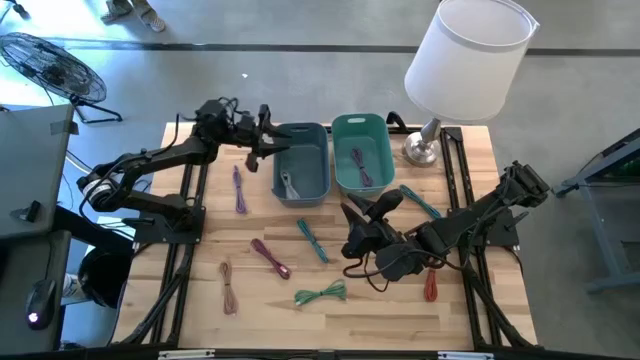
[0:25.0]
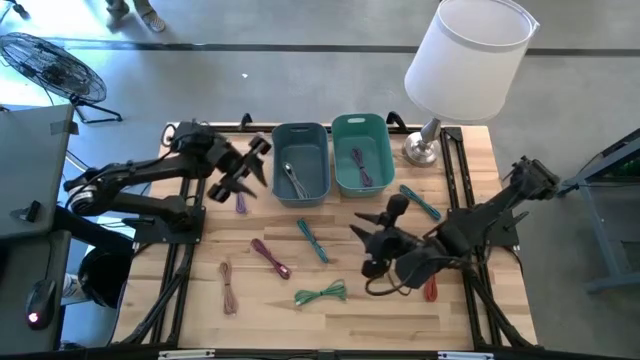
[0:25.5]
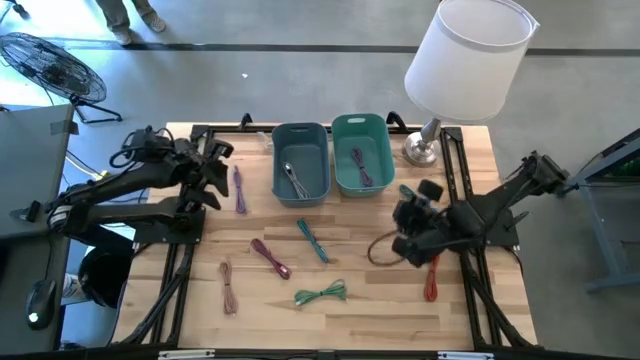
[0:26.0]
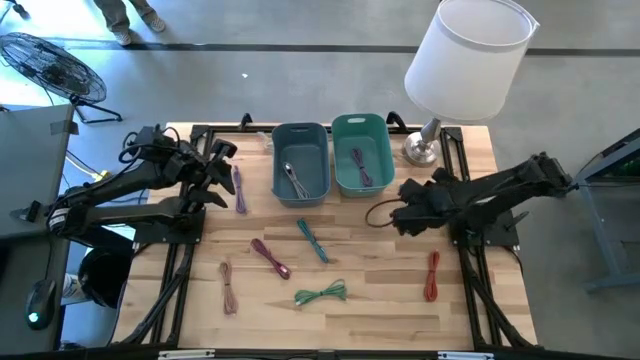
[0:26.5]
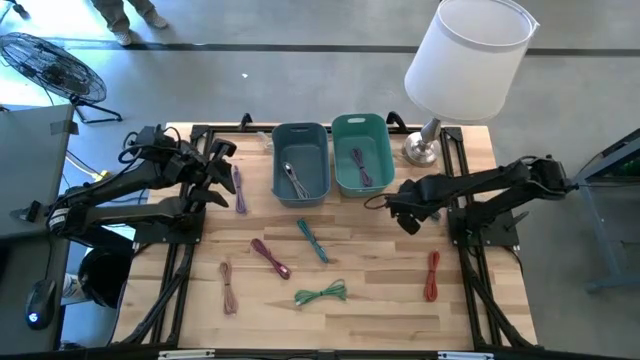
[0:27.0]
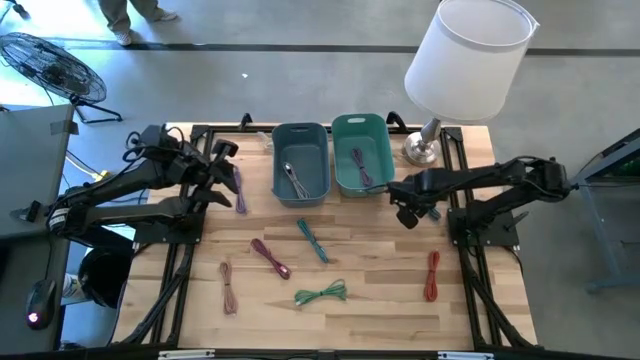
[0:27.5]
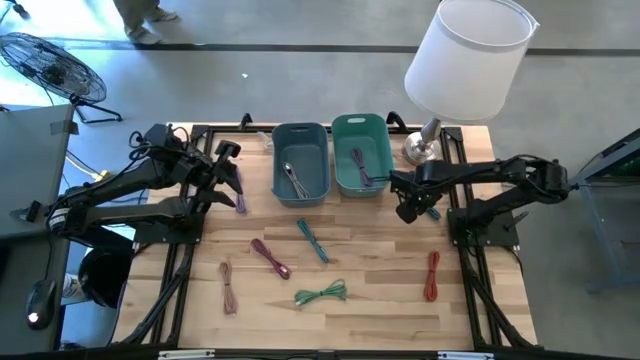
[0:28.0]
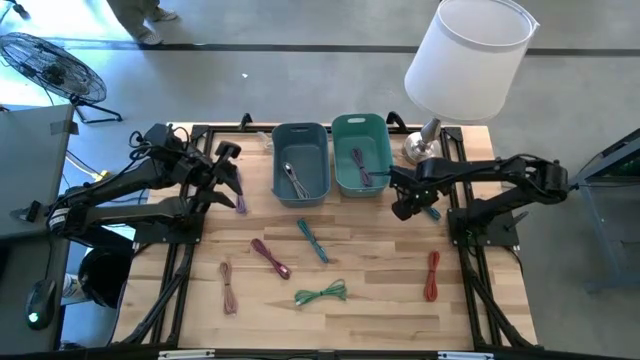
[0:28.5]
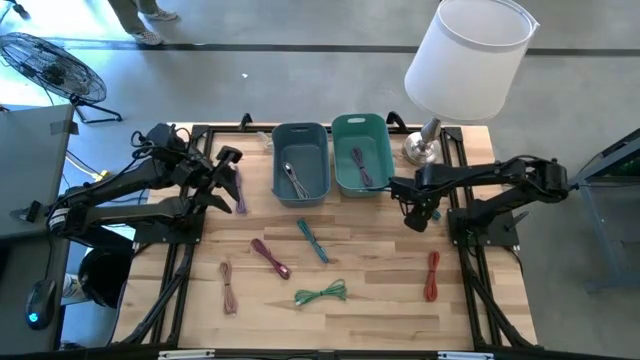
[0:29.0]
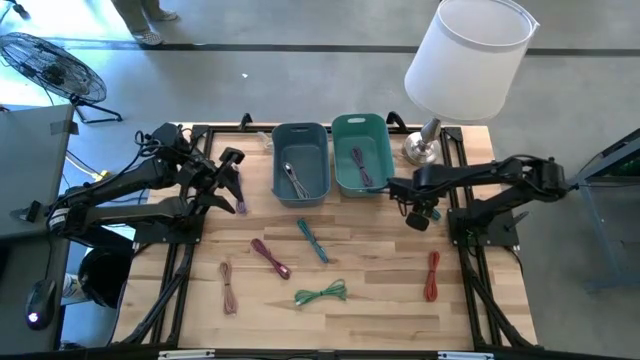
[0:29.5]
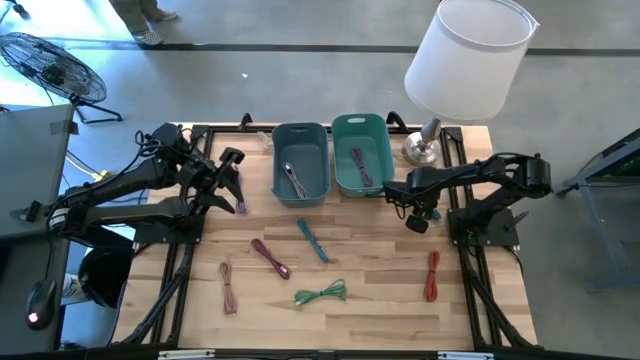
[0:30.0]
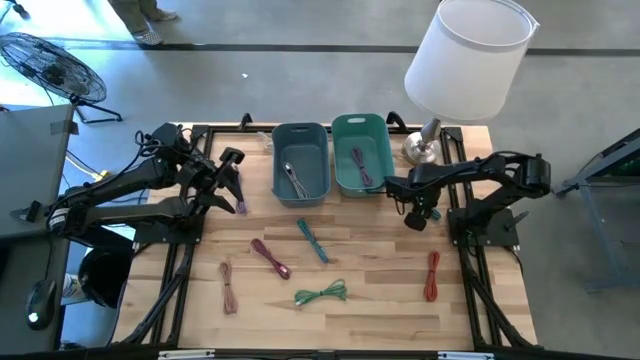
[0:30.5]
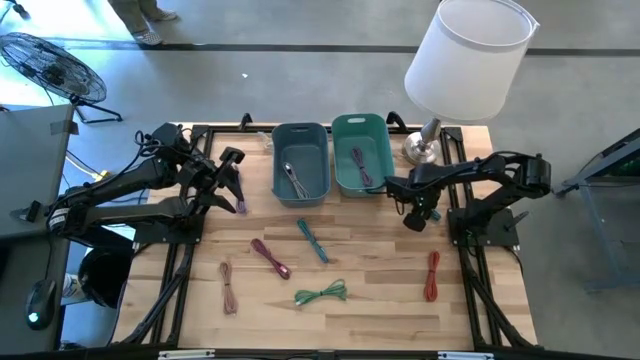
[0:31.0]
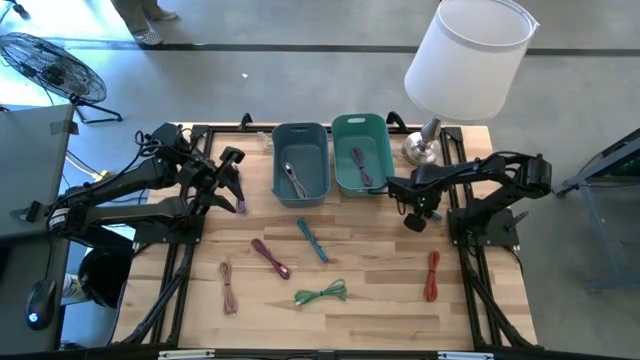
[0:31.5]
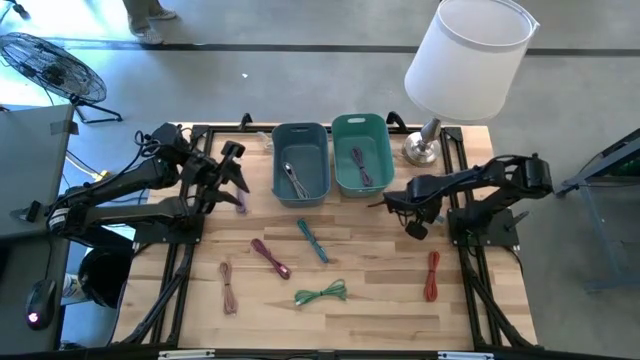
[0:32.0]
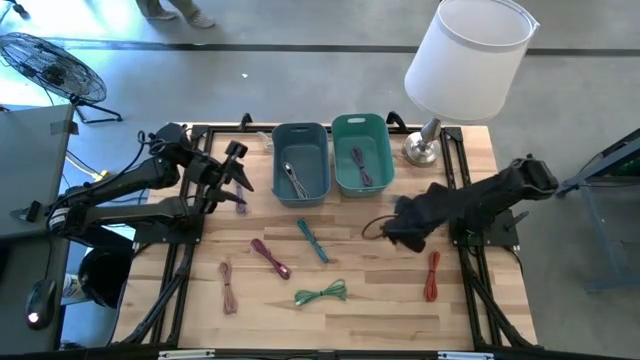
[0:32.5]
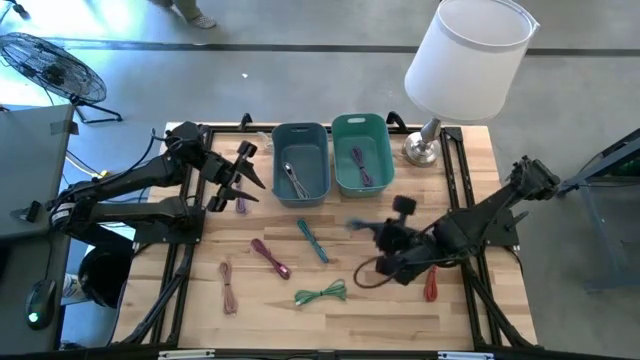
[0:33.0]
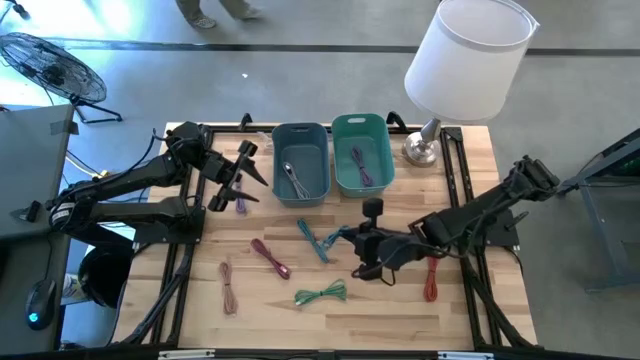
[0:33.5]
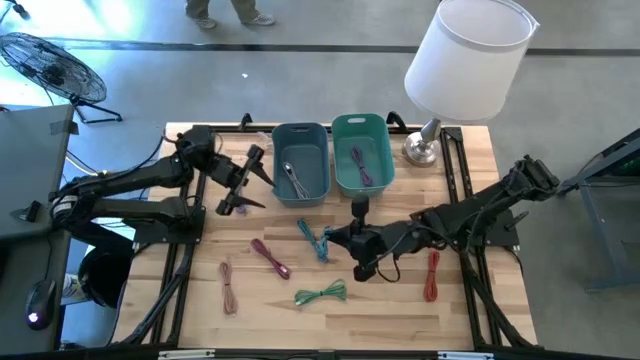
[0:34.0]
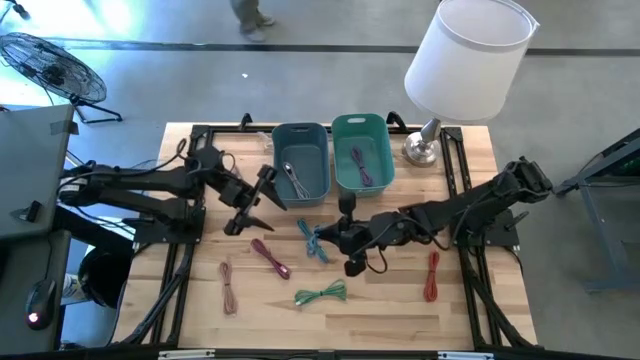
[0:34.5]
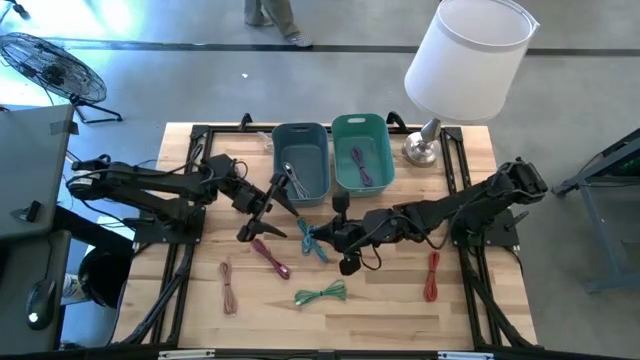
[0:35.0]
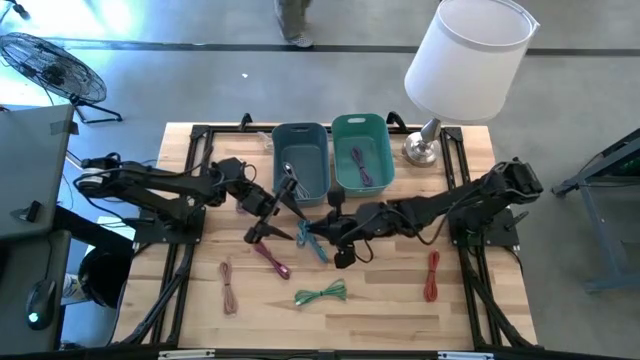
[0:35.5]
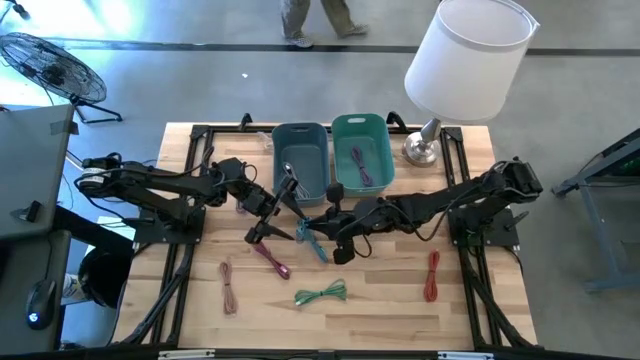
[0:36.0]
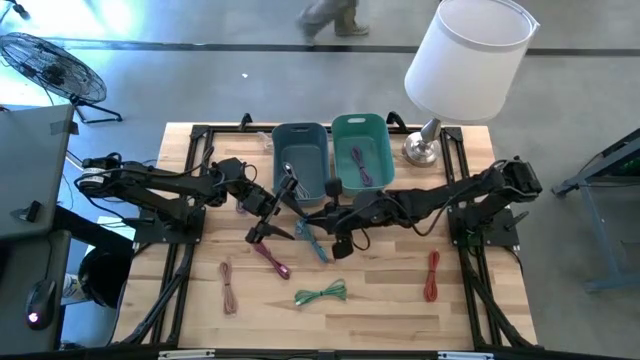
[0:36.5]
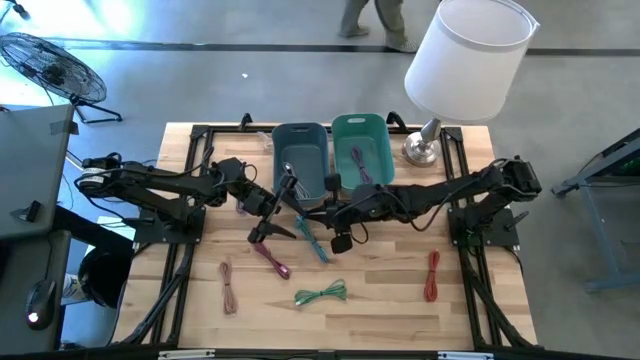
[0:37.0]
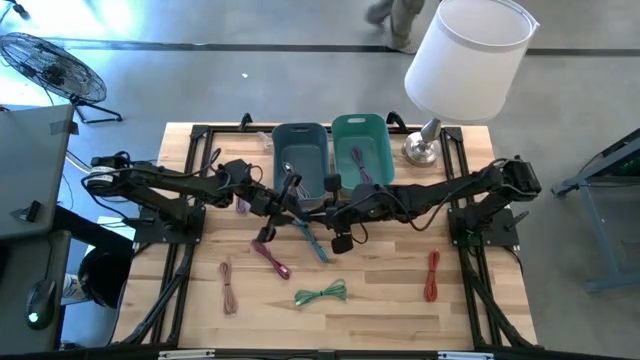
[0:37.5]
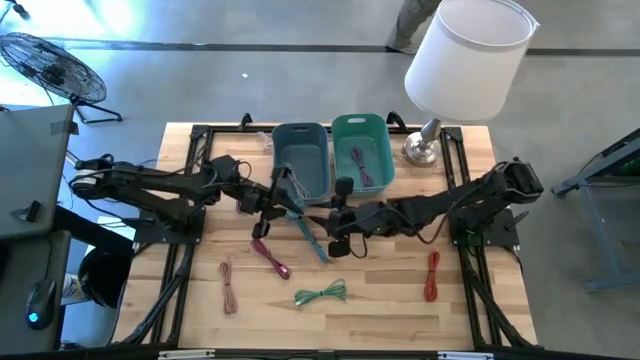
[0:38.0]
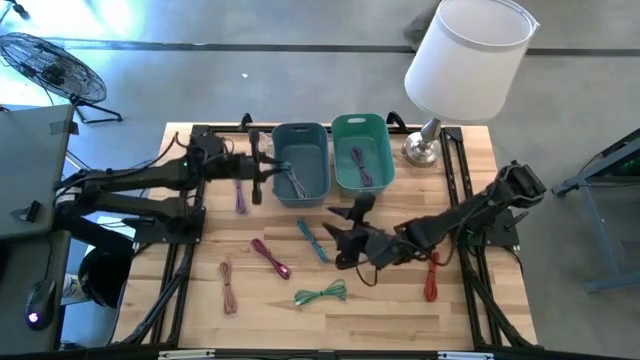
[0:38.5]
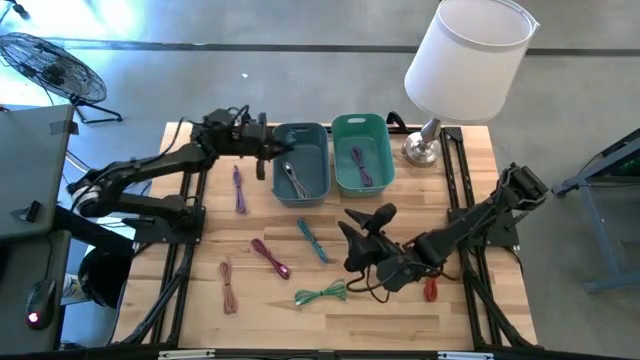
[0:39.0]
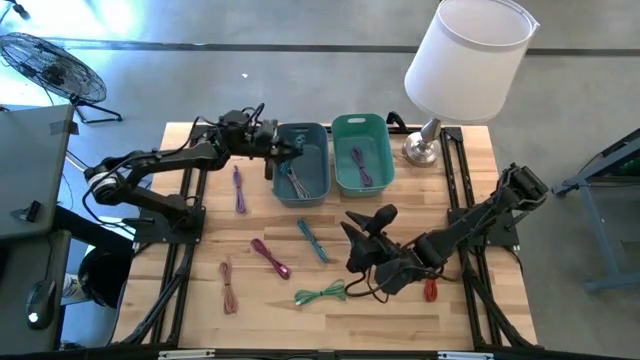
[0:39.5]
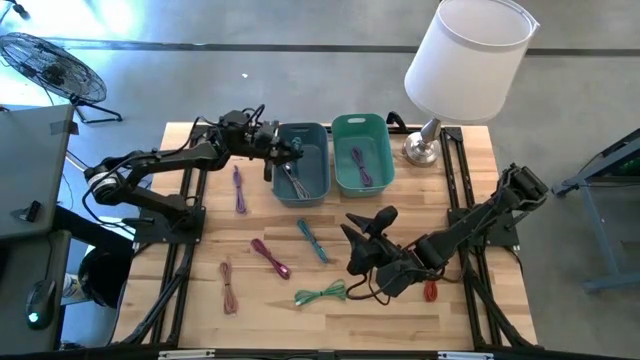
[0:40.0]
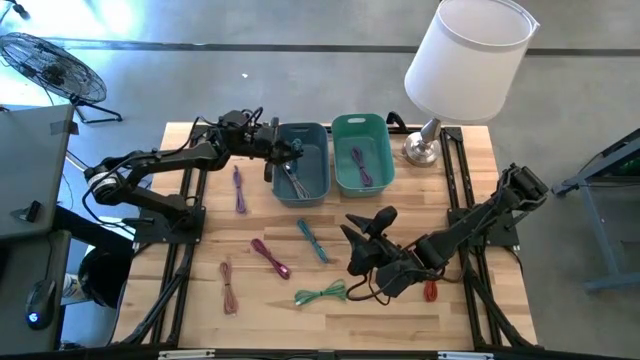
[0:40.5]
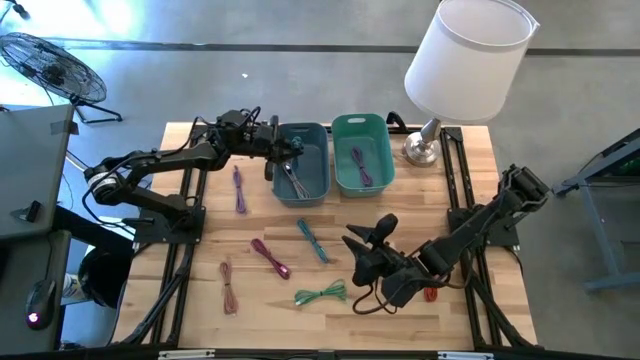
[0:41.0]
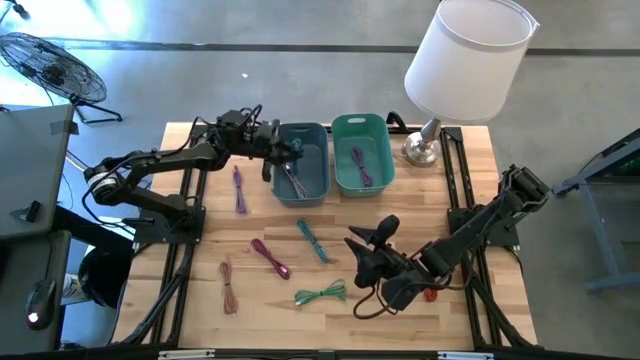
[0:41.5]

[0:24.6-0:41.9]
Task: Pick & Place USB Port
Put the right blue charger cable into the blue bin

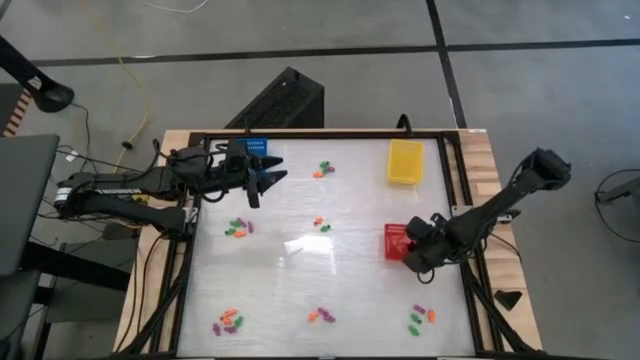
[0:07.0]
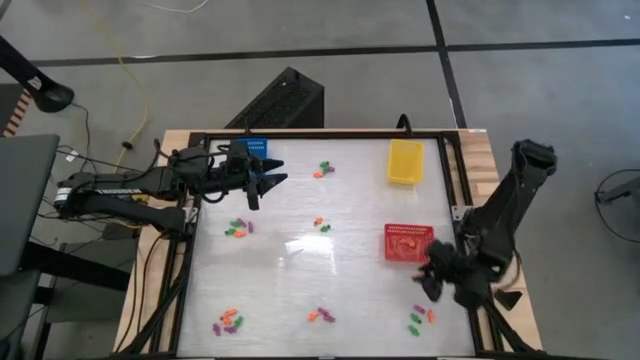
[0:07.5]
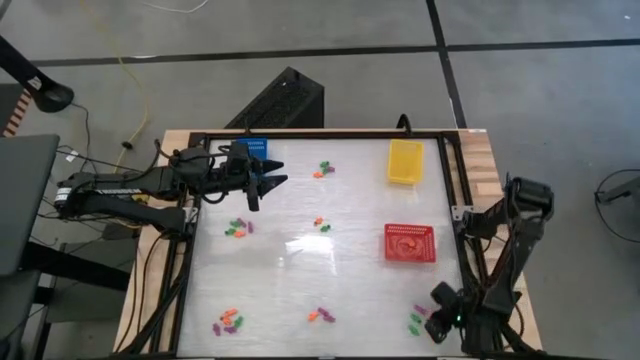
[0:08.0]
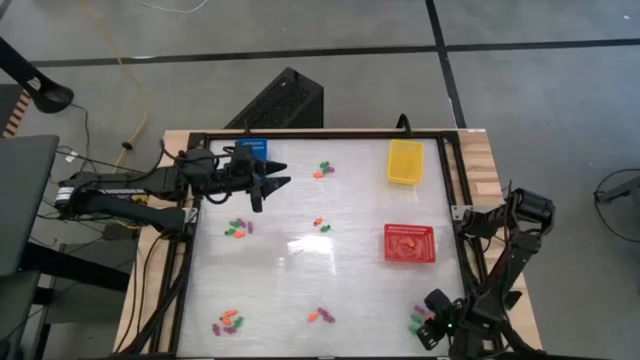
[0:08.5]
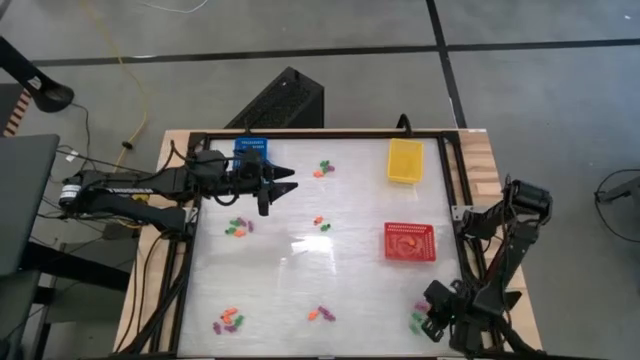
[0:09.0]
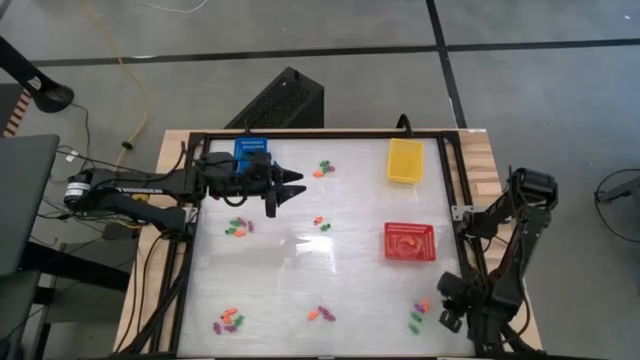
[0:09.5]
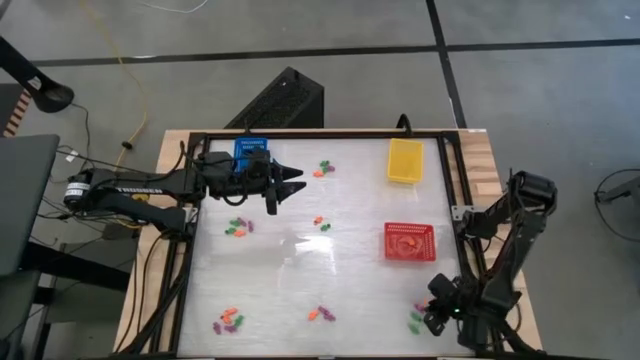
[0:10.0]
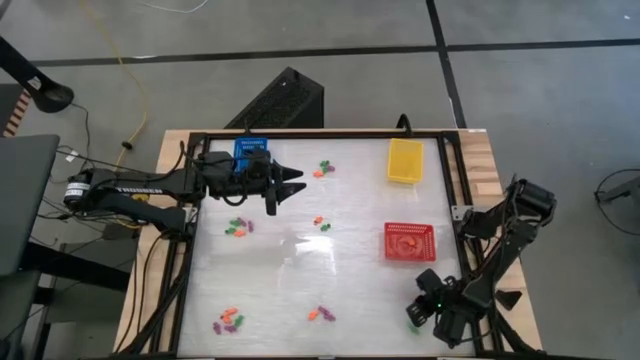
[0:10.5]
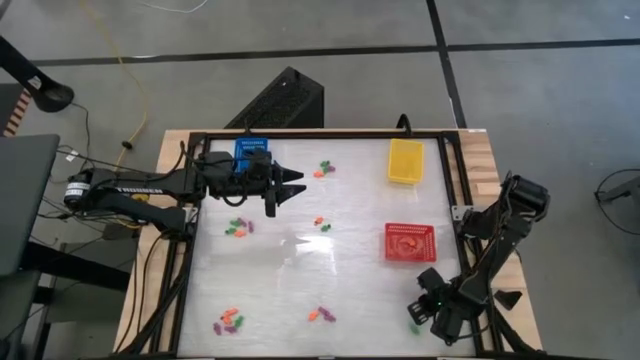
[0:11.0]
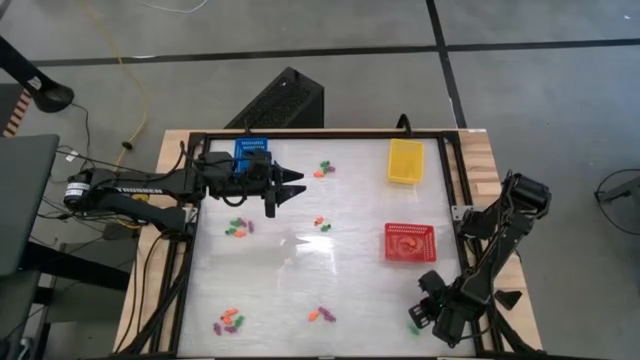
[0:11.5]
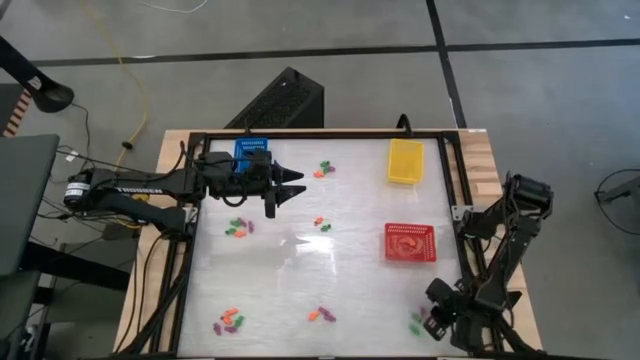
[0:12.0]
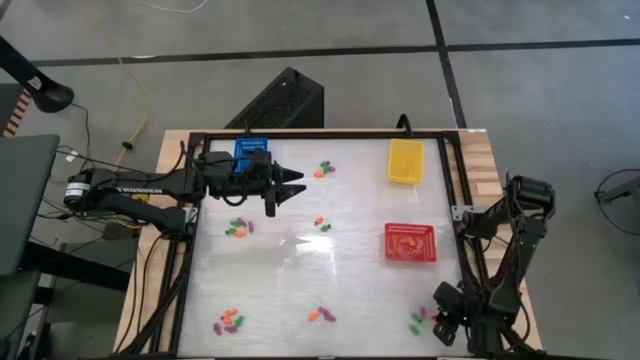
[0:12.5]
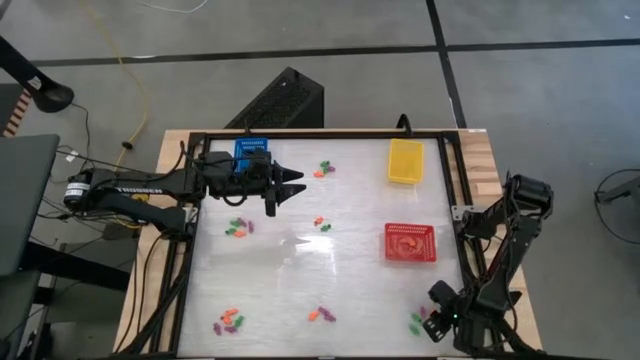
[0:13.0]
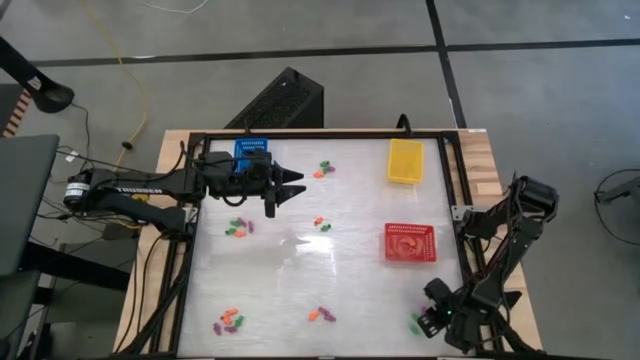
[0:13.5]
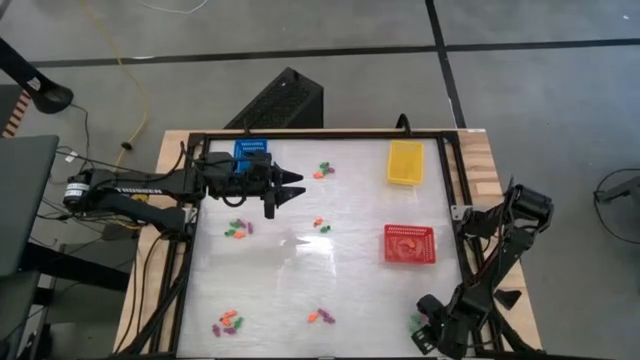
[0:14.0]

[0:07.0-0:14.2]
Task: Sort Halloween decoration
Put the orange skeleton toy into the red bin
